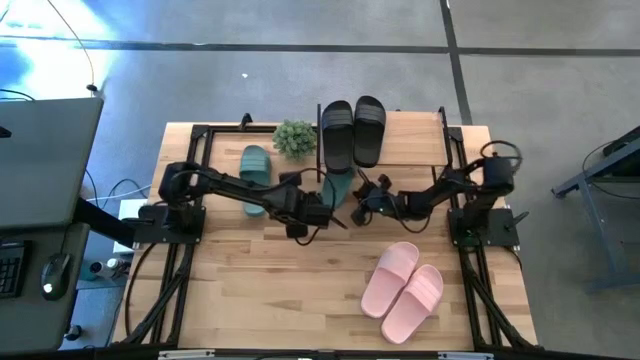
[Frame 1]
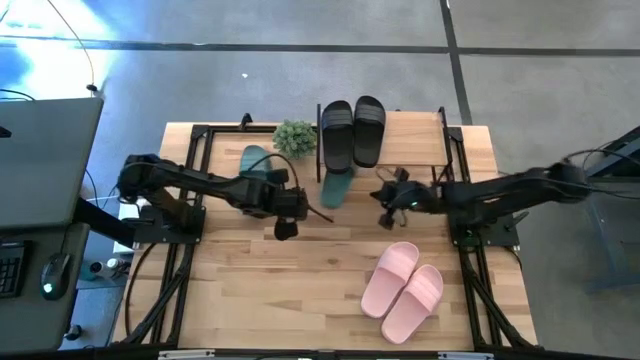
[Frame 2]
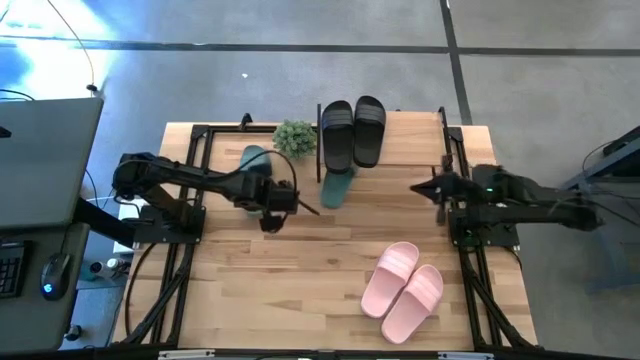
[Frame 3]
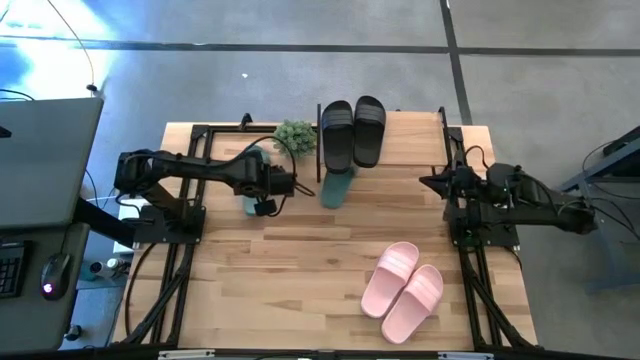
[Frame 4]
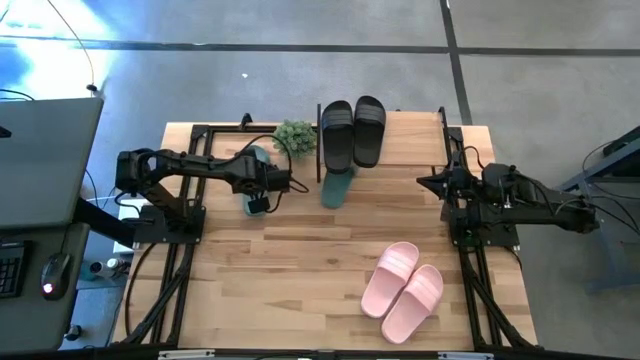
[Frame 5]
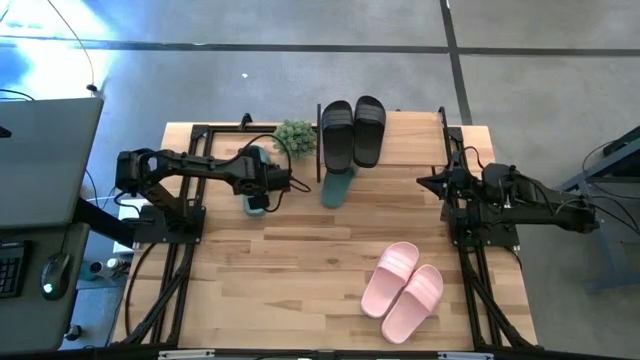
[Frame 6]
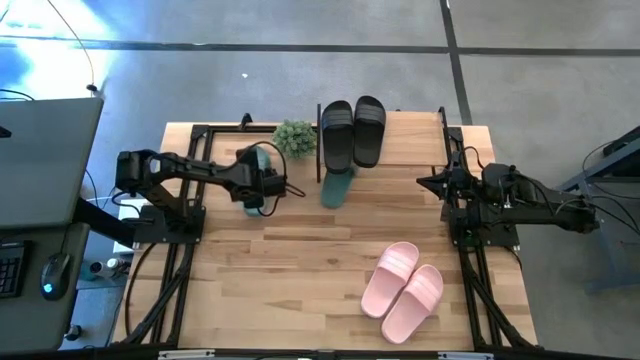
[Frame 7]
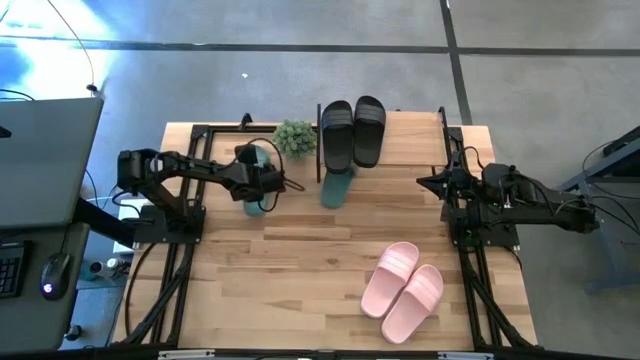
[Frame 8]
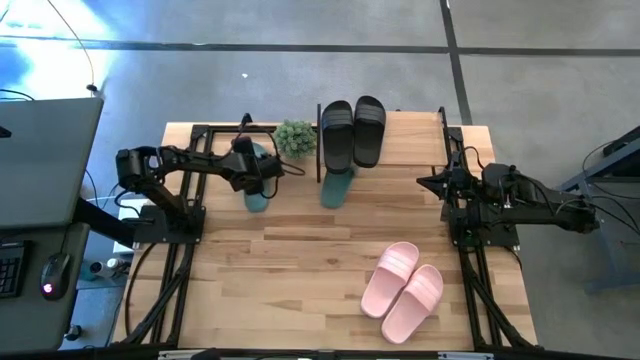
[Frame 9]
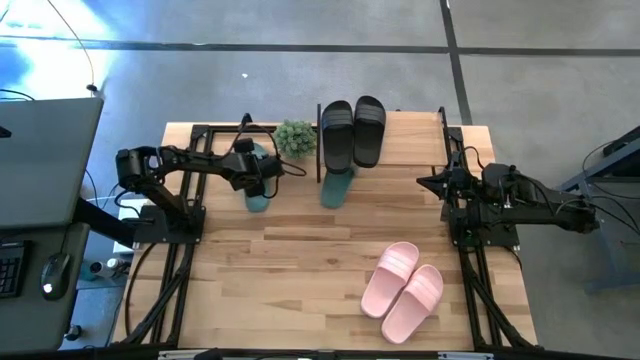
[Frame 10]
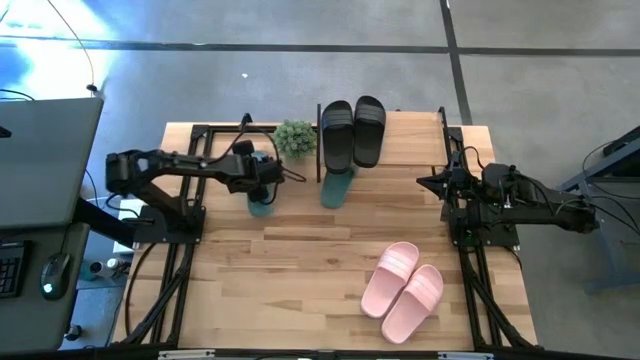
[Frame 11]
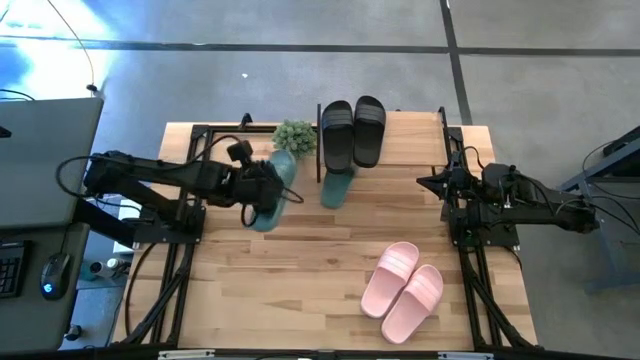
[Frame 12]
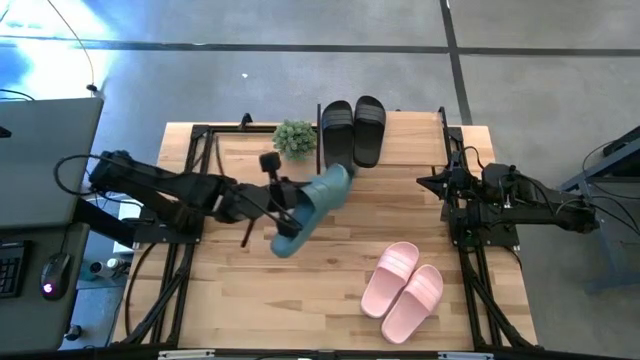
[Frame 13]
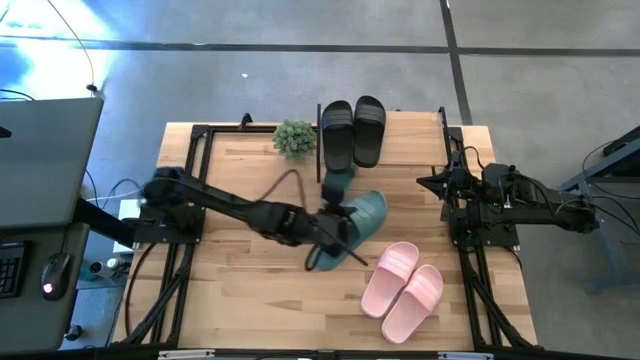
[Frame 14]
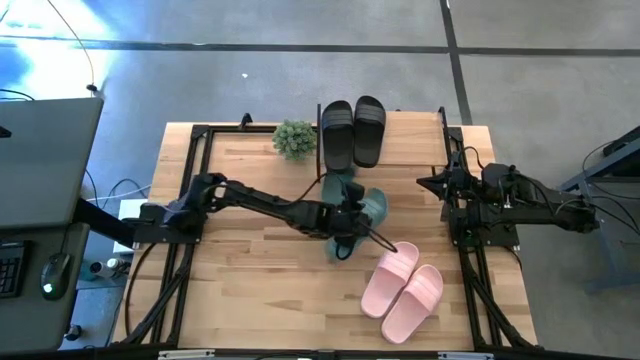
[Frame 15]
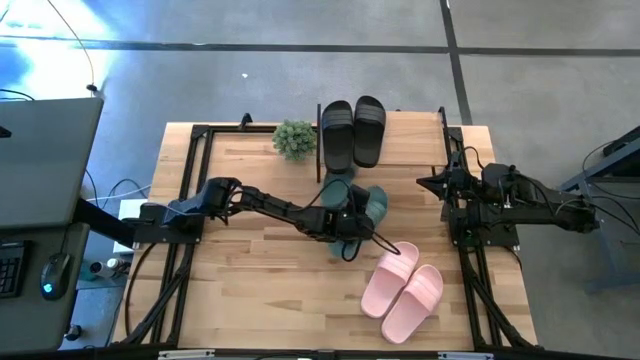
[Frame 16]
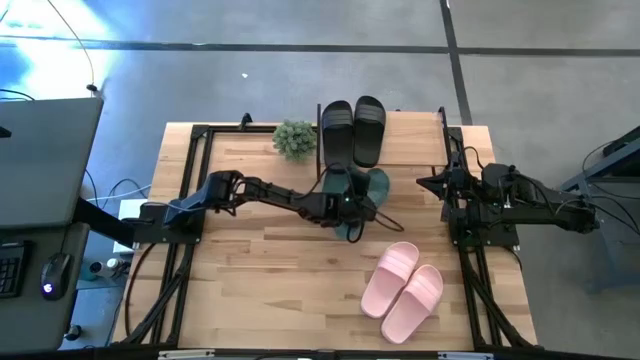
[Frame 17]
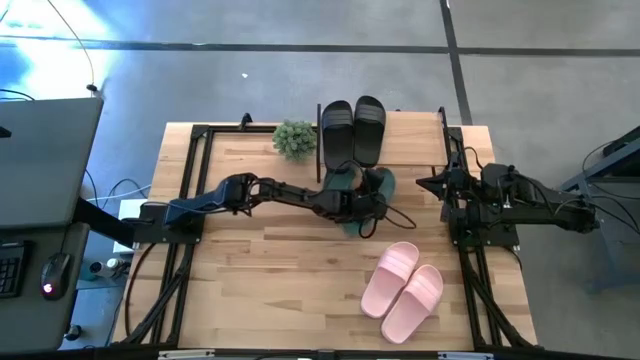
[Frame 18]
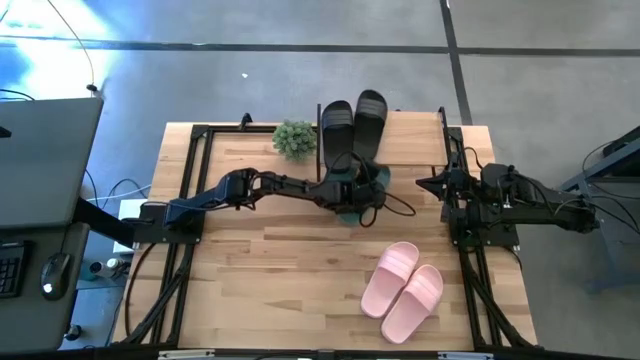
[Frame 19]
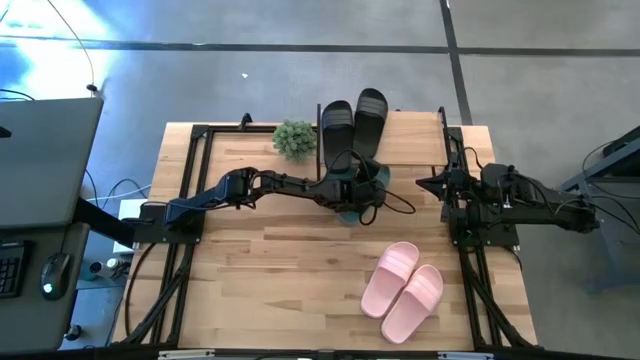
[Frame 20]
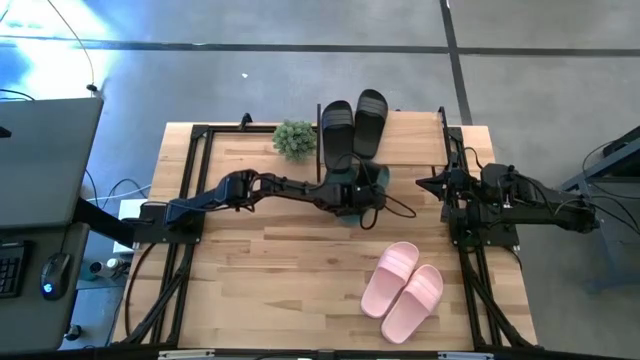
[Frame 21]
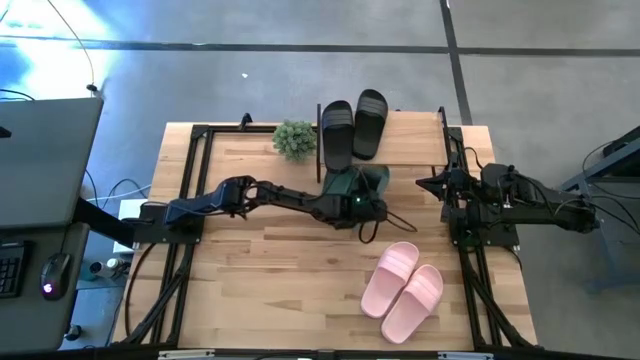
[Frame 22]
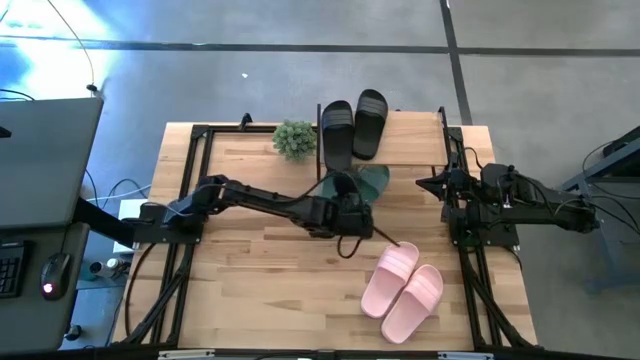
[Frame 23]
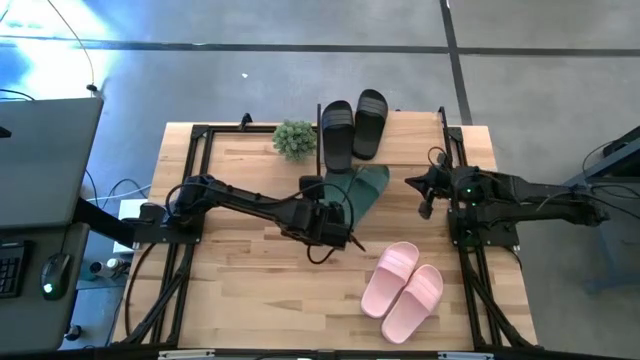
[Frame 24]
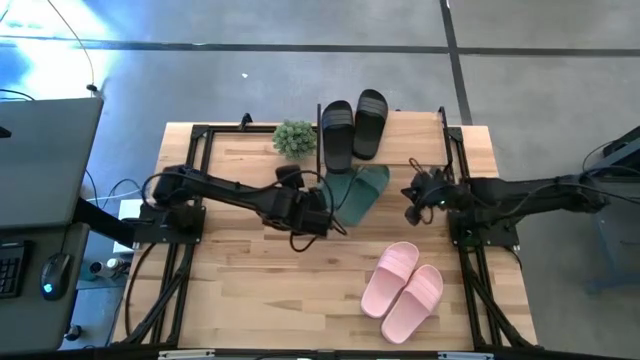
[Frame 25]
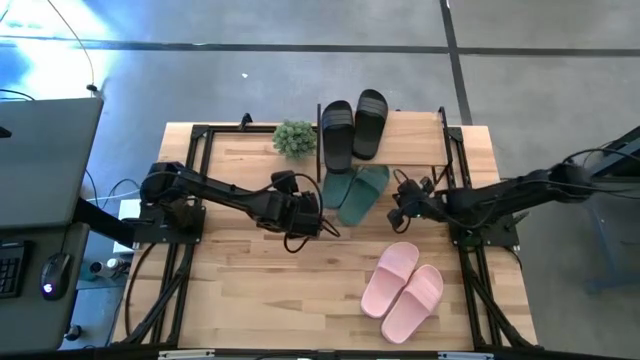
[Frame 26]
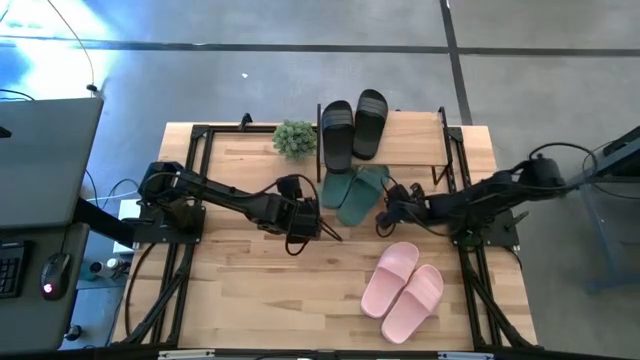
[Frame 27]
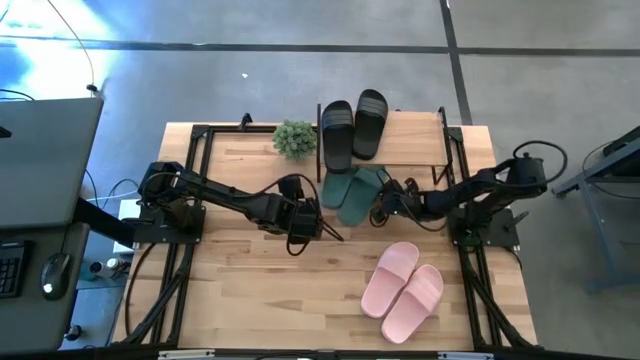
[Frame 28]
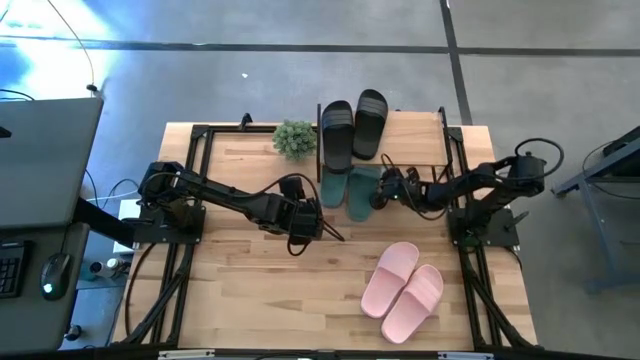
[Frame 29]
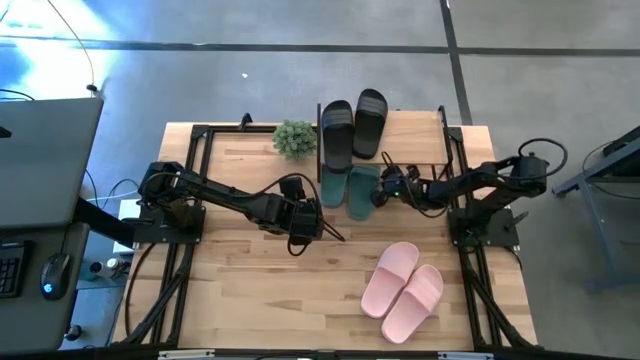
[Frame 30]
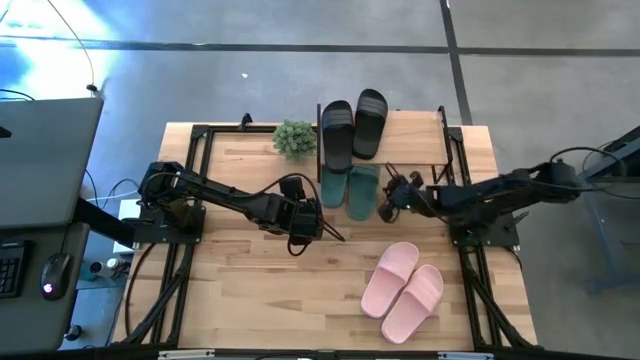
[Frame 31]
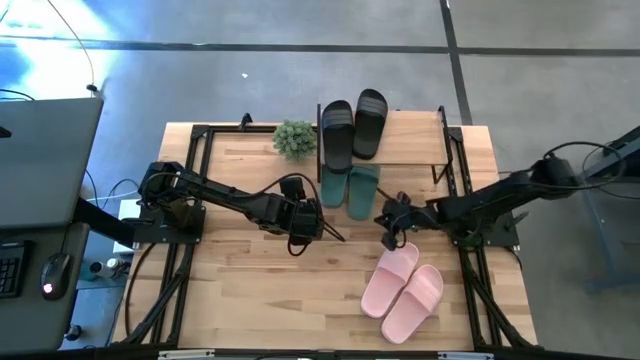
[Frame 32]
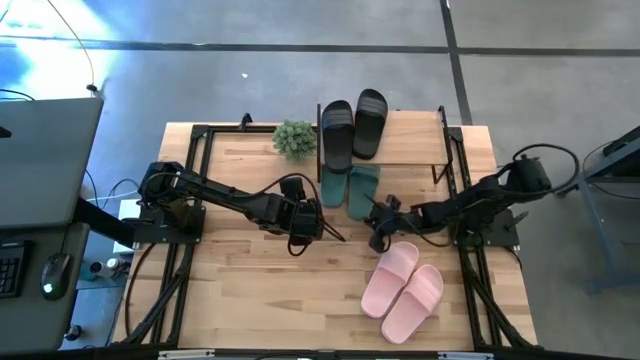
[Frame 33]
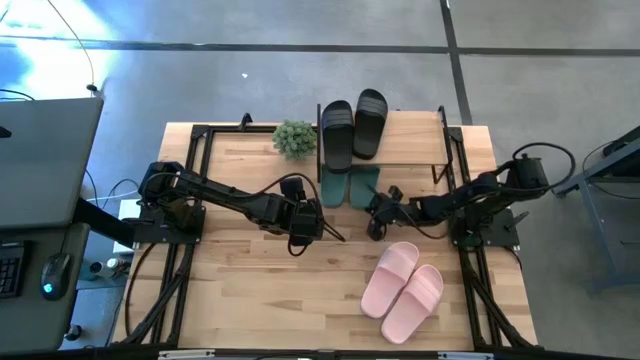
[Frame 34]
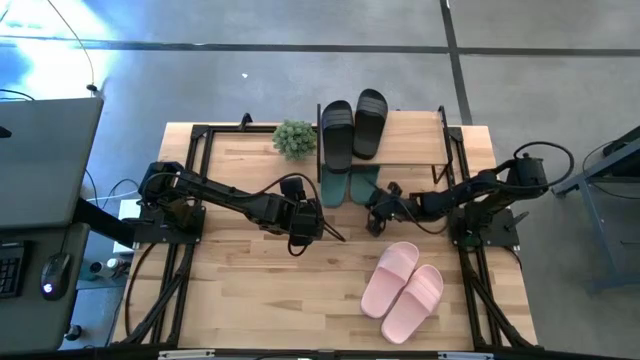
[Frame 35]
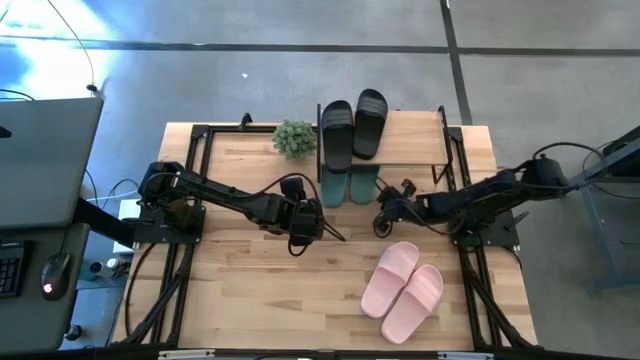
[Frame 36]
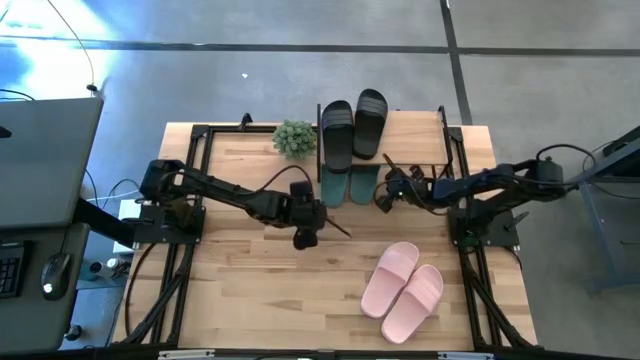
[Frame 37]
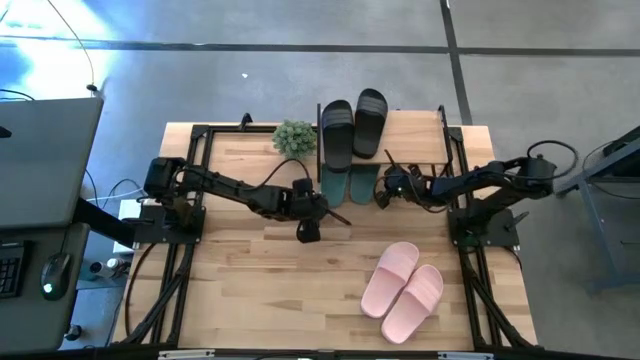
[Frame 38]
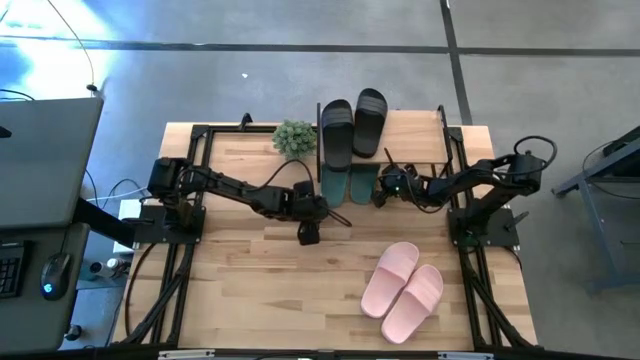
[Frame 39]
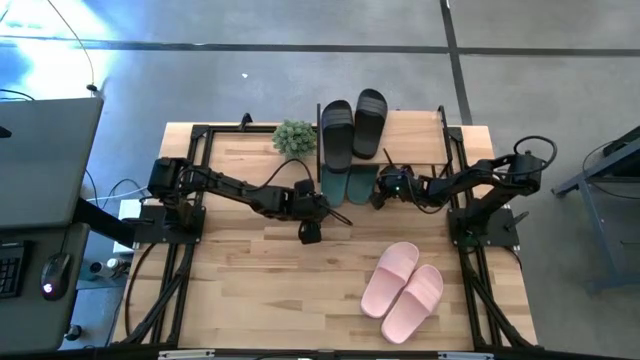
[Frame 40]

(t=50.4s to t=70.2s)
Task: Pick and place slides into the shelf
Put the green slide under the shelf

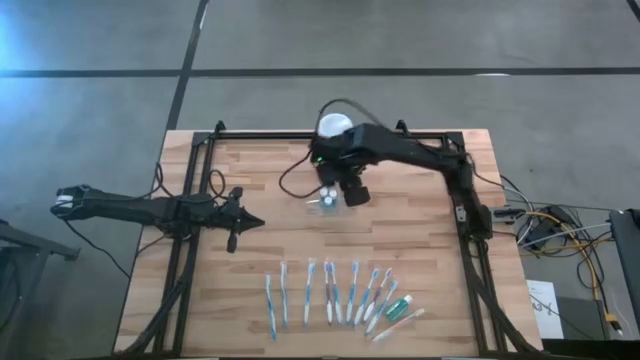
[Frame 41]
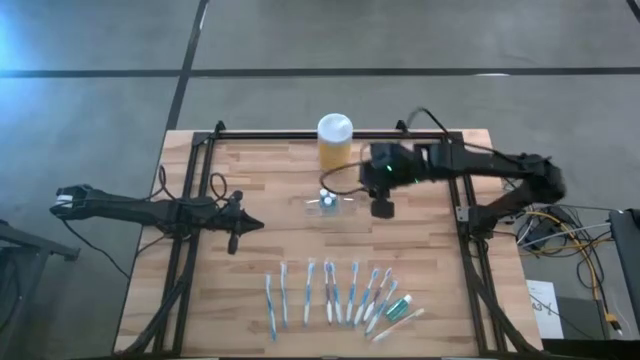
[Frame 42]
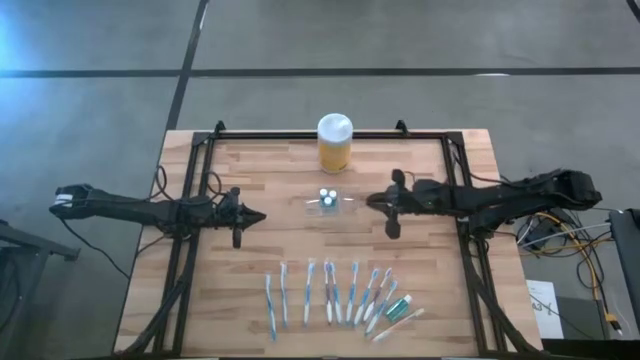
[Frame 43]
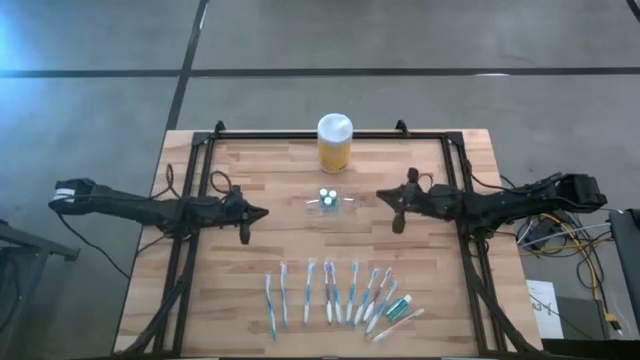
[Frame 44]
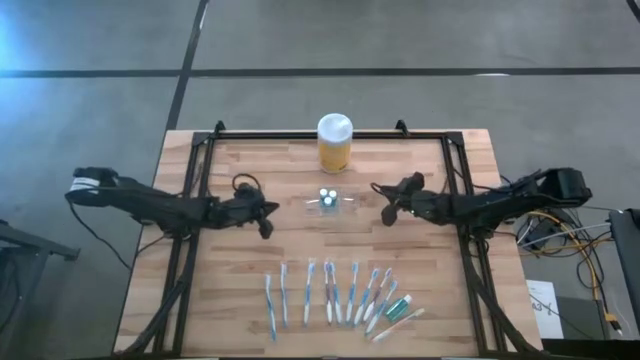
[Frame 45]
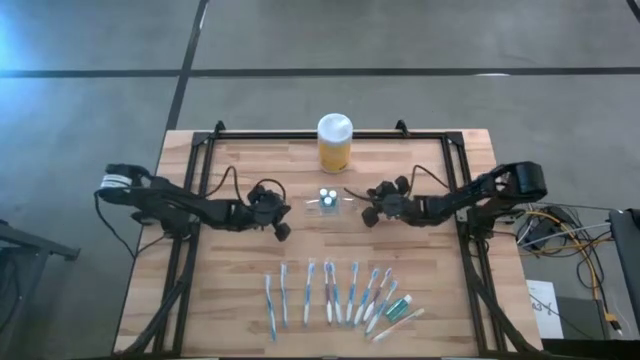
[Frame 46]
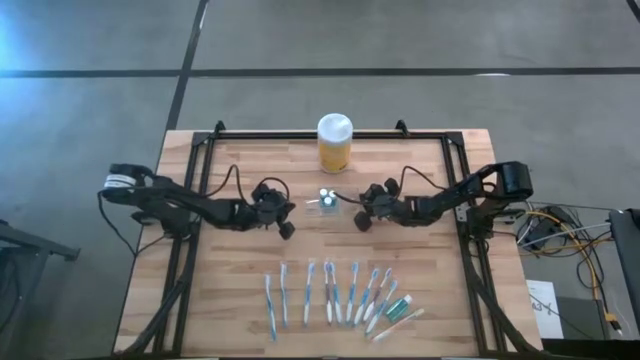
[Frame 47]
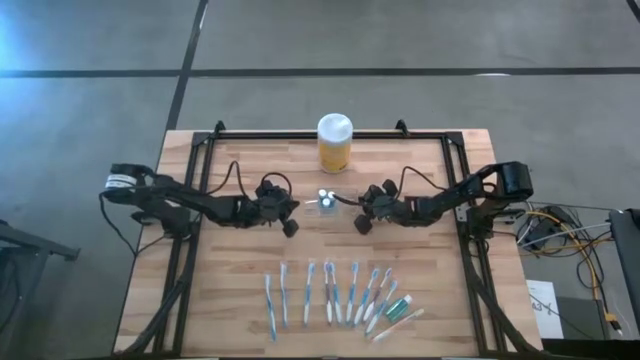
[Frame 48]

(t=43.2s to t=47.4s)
Task: Pick & Place toothbrushing station
Adjust the transparent organizer
